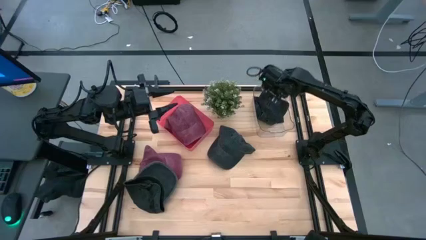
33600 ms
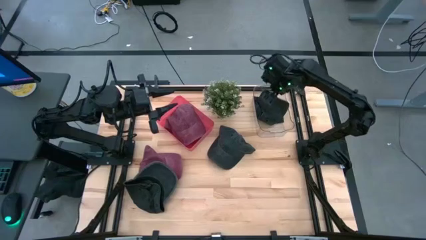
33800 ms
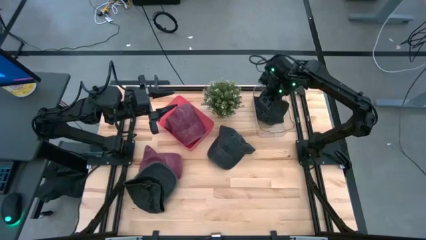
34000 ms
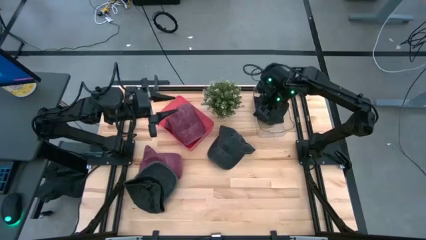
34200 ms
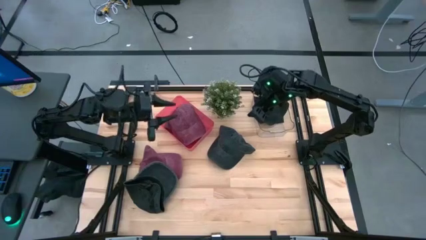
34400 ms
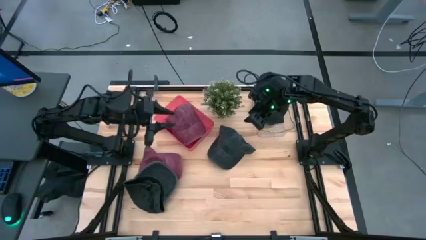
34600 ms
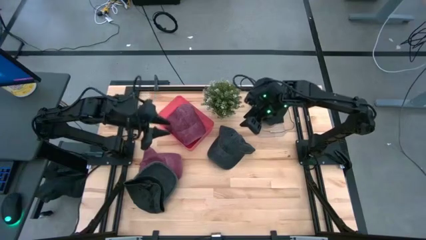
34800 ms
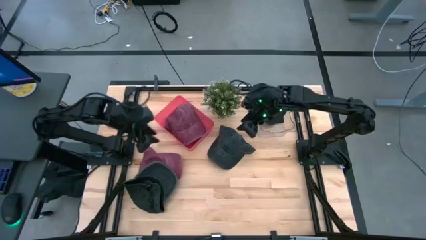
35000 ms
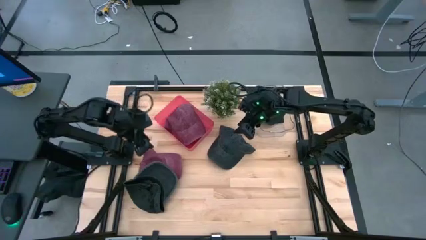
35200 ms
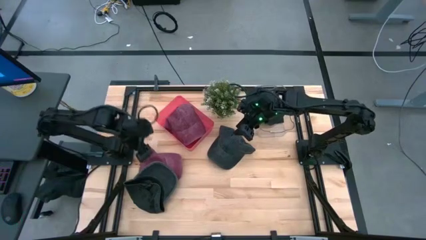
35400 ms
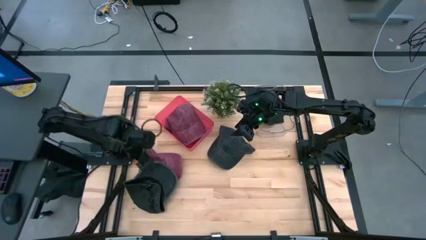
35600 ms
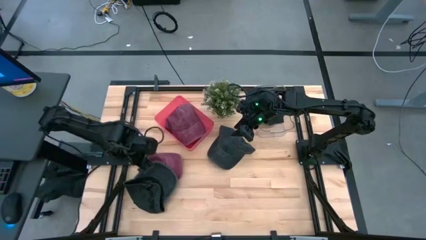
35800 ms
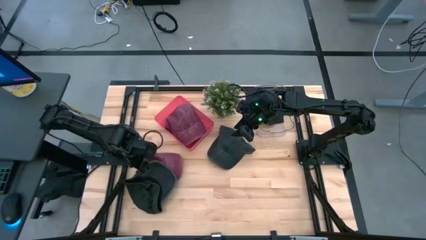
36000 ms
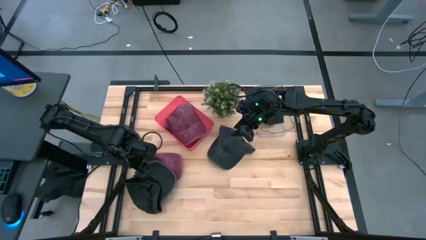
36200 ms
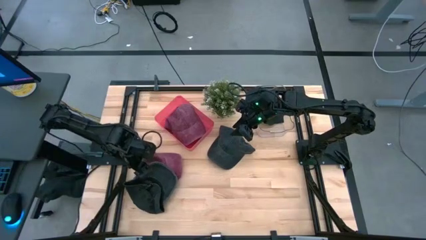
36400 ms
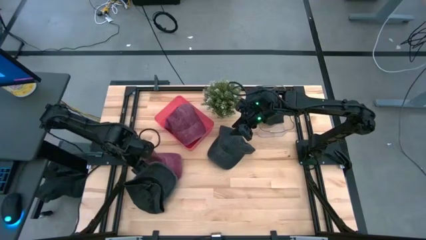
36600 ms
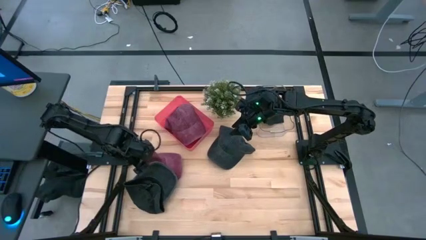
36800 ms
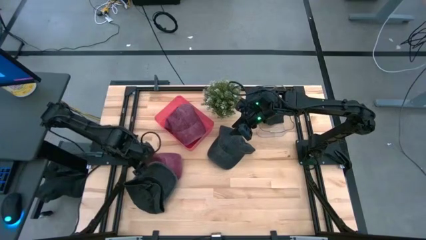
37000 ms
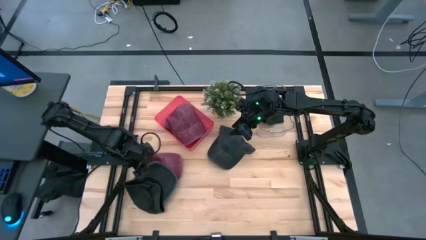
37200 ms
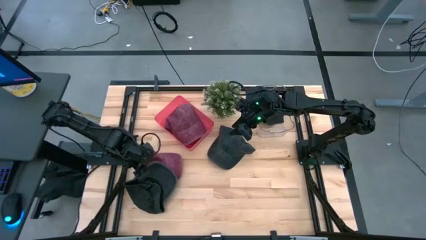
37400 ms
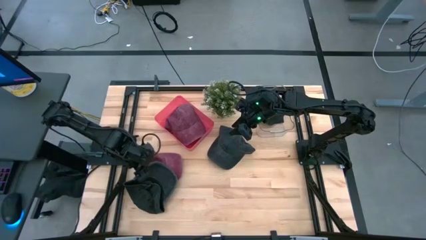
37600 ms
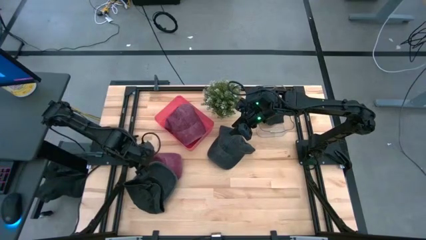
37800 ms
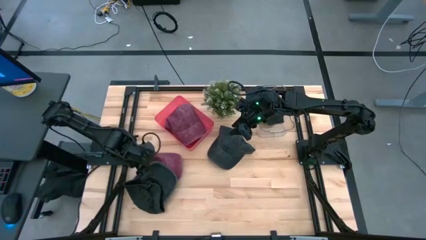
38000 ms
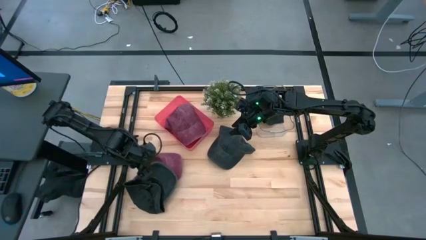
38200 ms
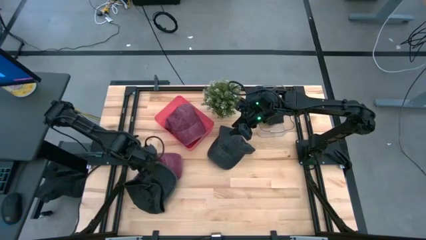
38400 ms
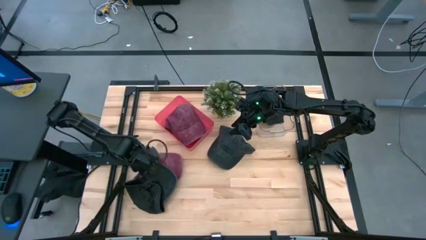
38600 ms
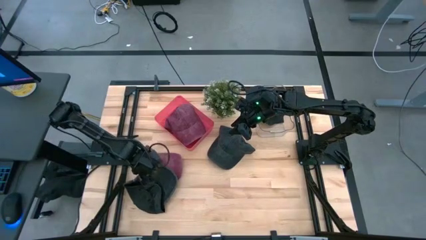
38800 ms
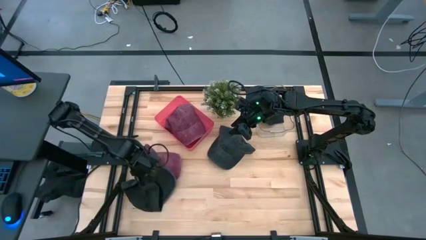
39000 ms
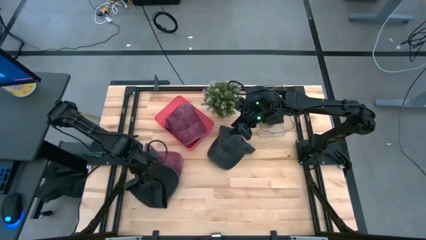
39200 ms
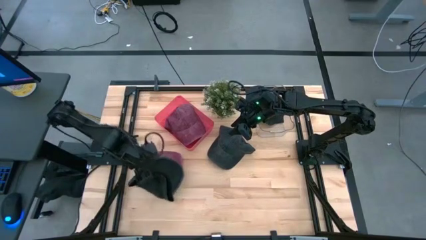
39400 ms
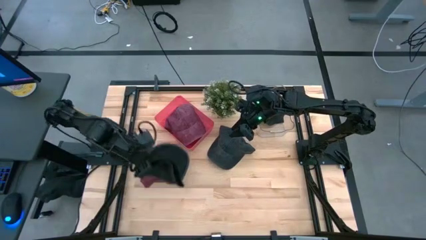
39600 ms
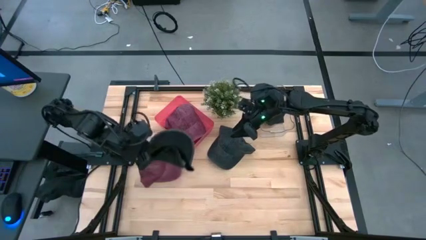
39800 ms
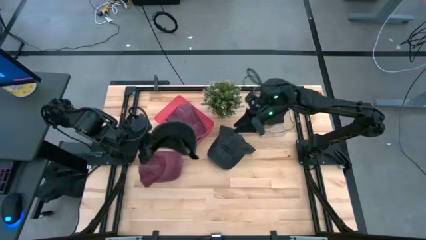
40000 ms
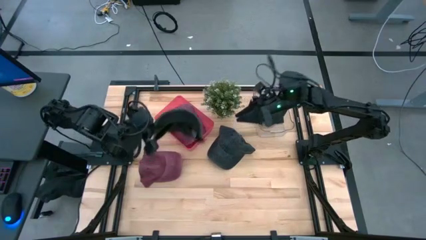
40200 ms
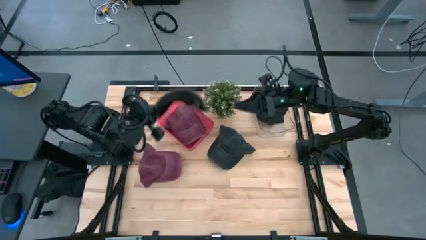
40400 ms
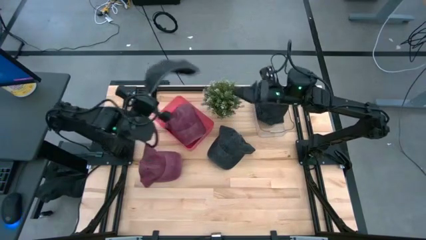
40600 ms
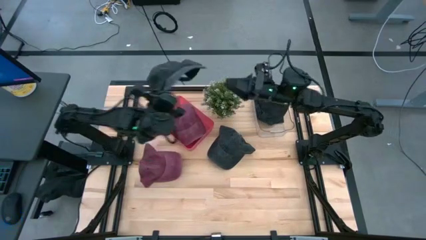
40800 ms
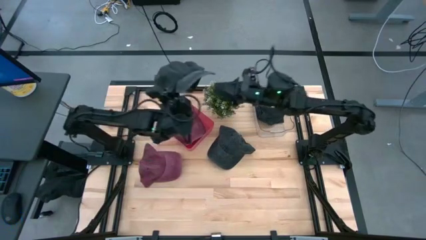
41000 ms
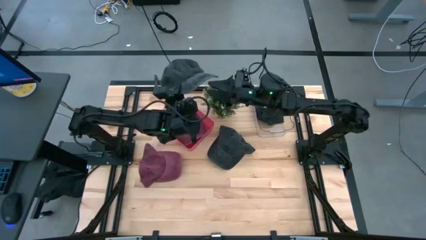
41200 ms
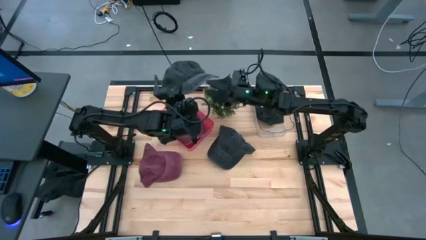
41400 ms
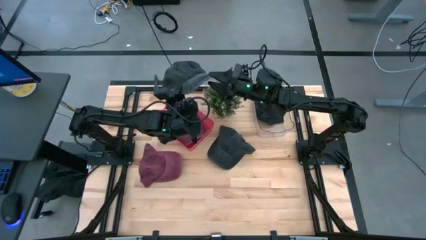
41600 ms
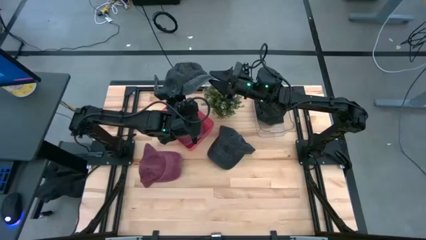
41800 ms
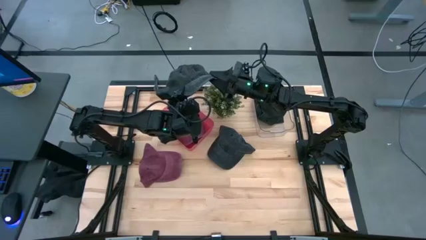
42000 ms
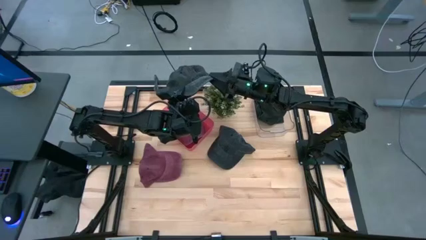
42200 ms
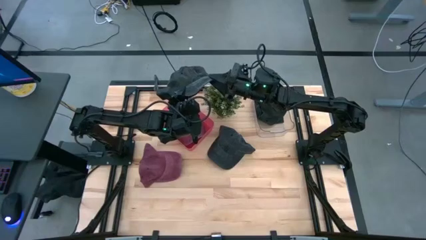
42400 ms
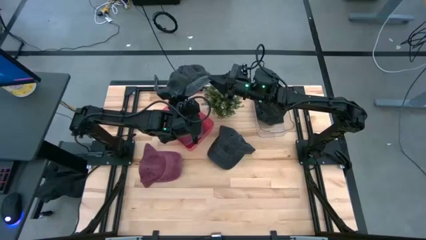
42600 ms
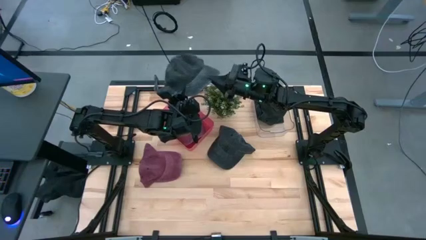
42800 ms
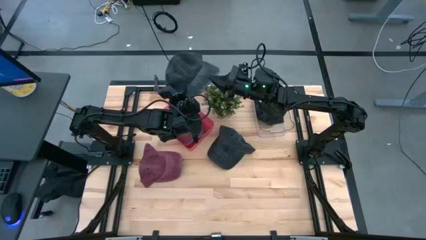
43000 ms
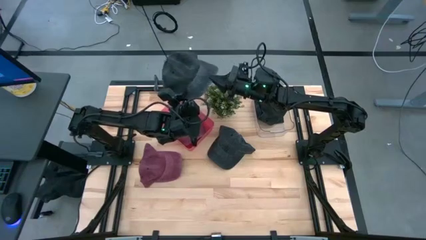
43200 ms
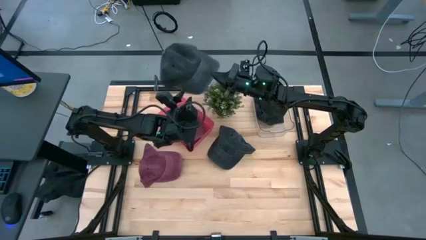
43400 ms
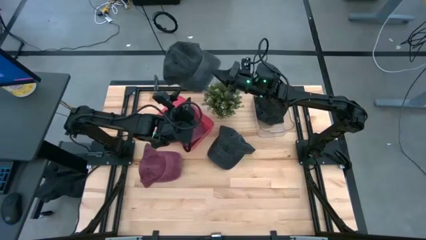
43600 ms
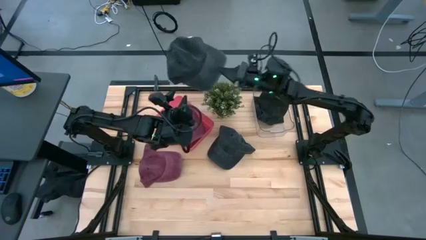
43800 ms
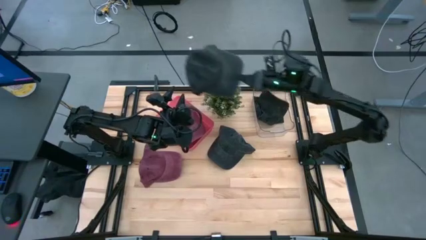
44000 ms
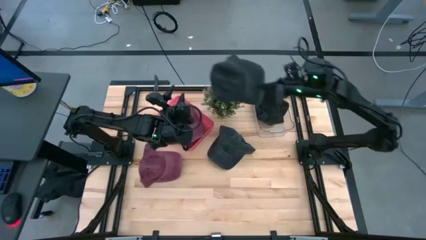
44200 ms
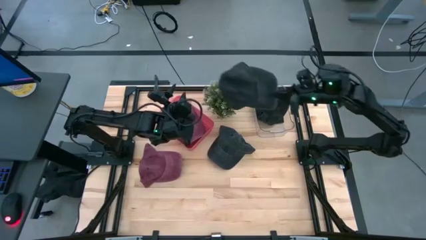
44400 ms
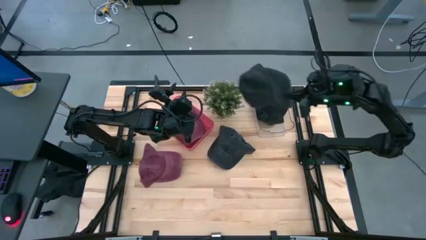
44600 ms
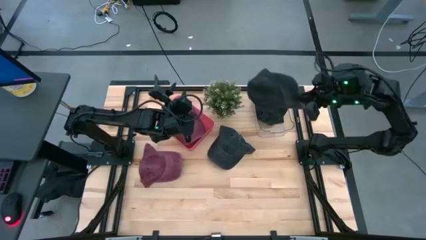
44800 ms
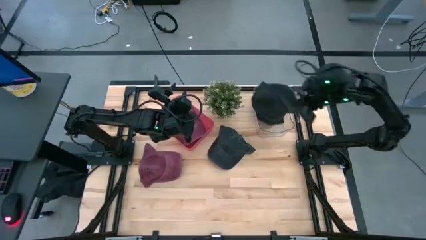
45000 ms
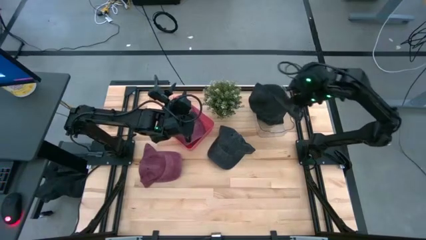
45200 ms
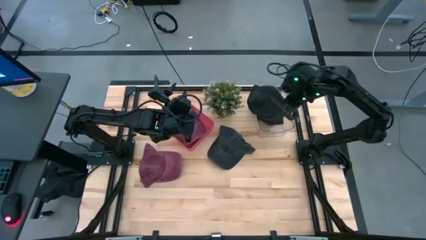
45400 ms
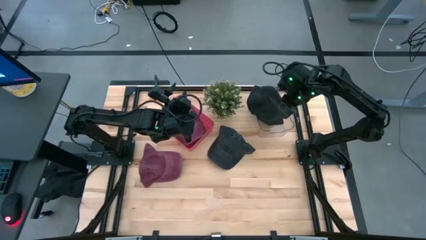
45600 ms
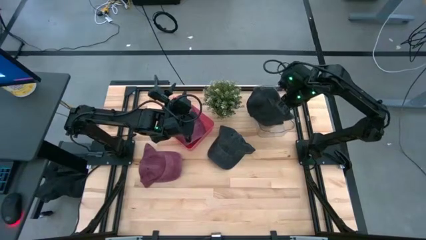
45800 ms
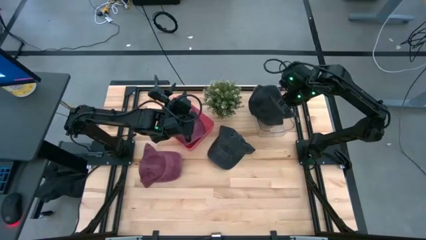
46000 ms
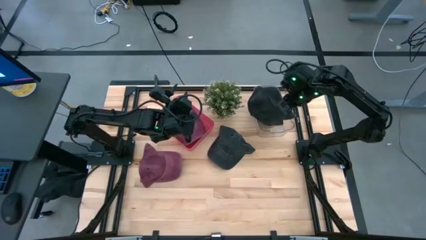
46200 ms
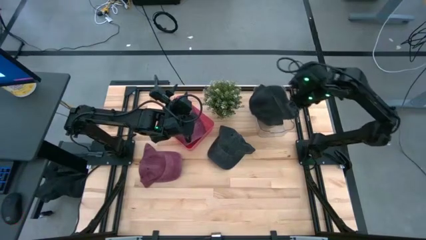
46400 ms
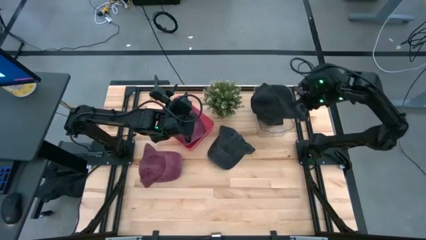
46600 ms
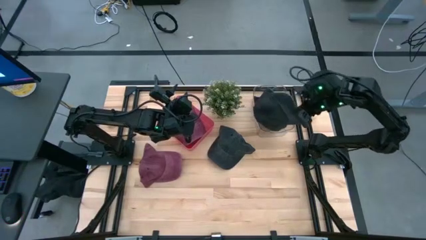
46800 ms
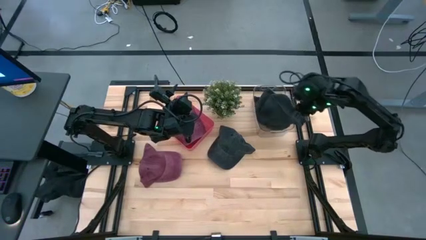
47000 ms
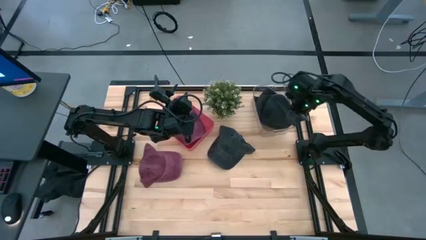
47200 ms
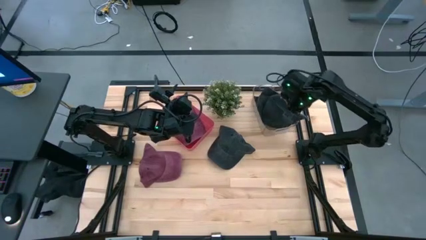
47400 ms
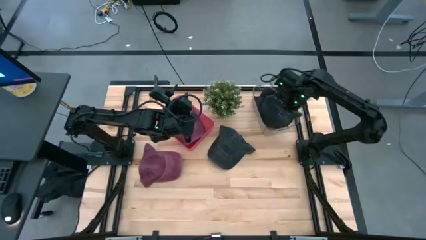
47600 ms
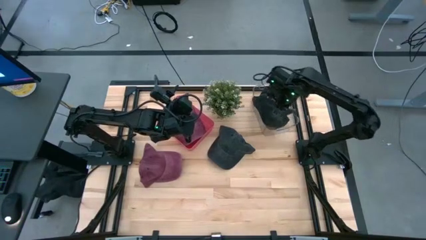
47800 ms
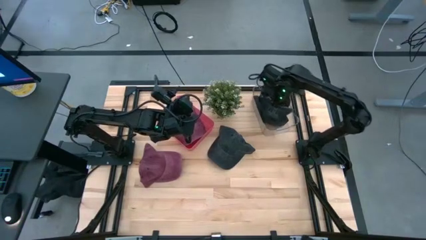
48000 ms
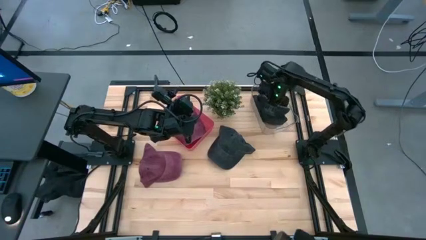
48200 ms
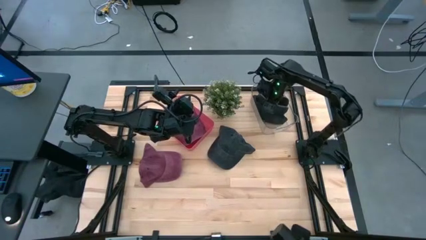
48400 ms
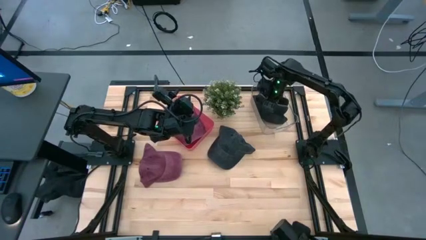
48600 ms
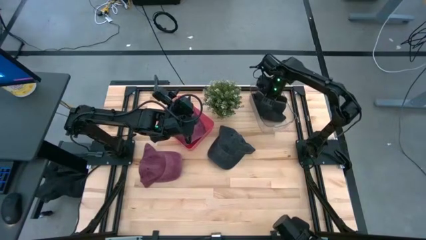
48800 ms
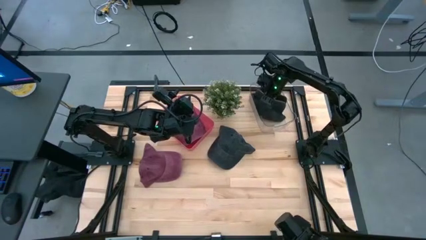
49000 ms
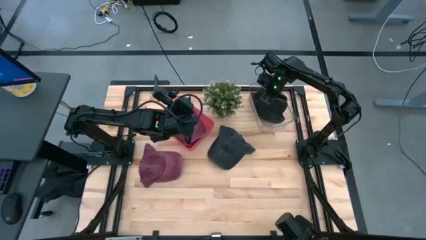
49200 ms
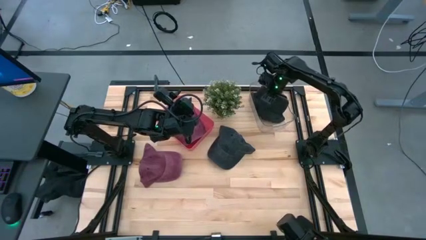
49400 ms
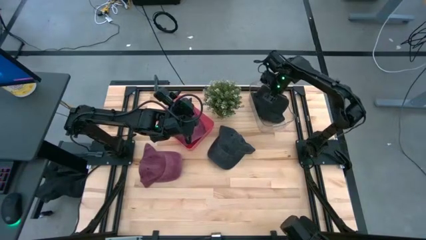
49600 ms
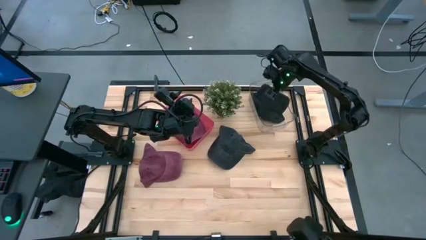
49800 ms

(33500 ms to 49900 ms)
Task: Pick & Place hat
Put the left black cap into the transparent bin
